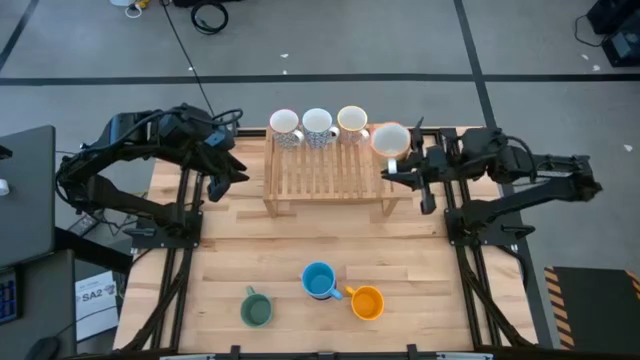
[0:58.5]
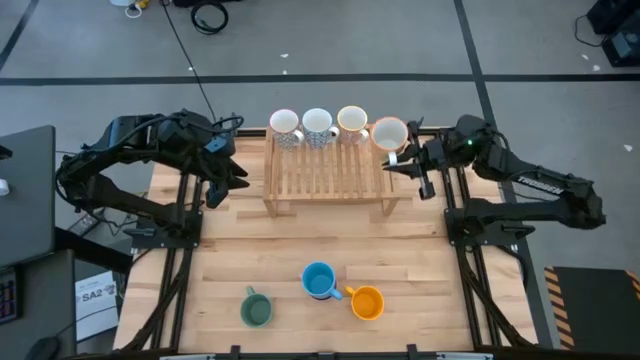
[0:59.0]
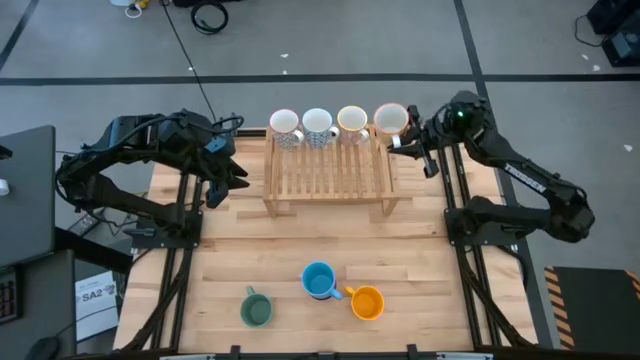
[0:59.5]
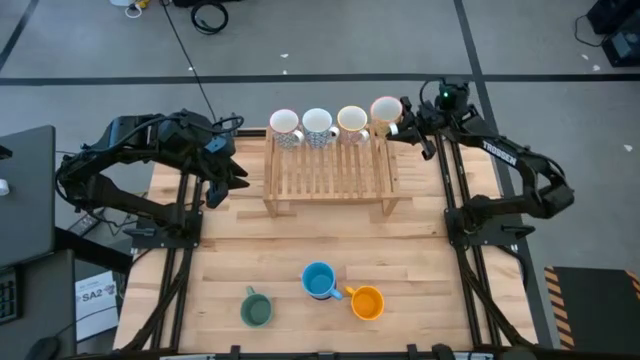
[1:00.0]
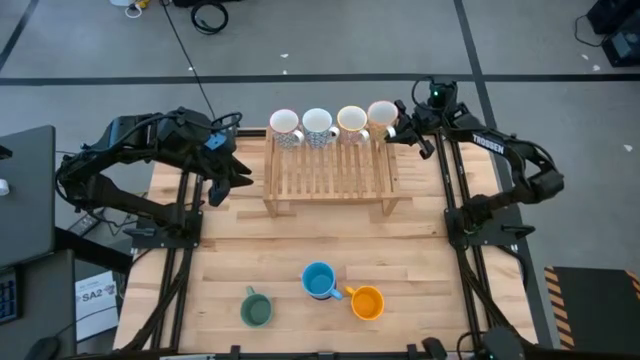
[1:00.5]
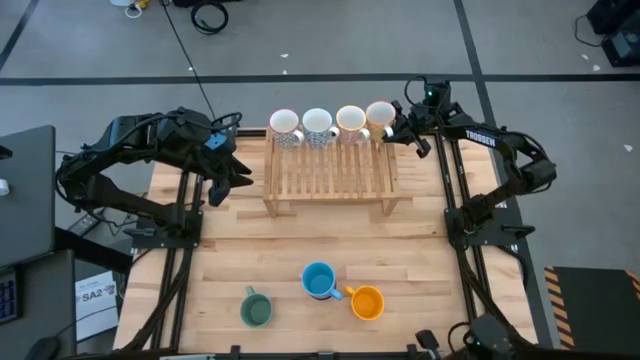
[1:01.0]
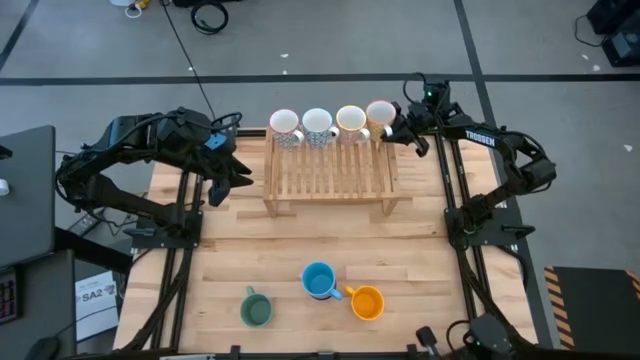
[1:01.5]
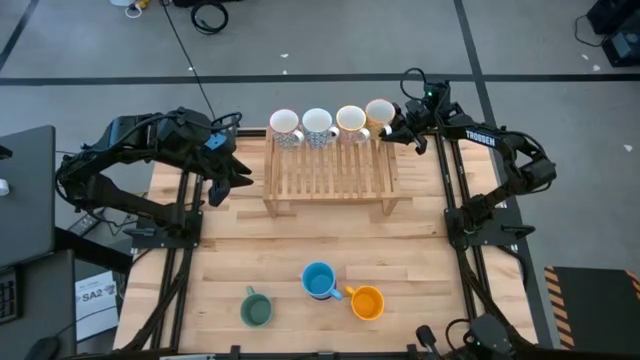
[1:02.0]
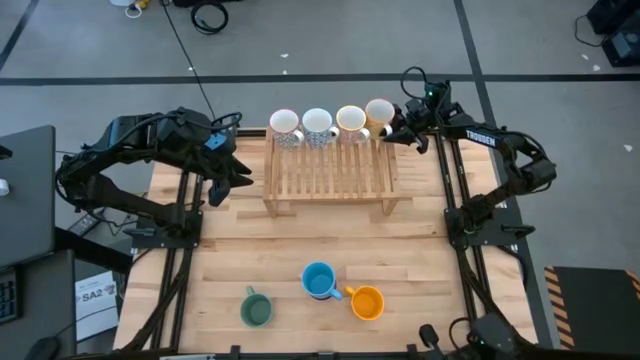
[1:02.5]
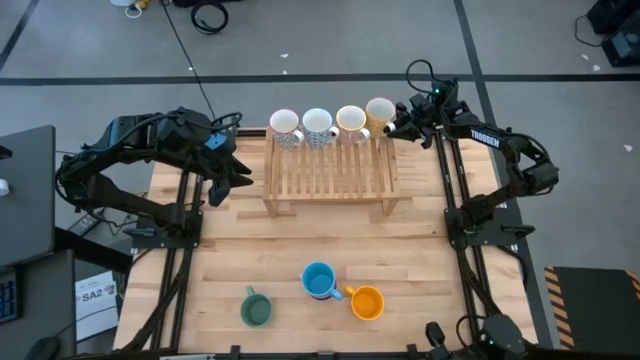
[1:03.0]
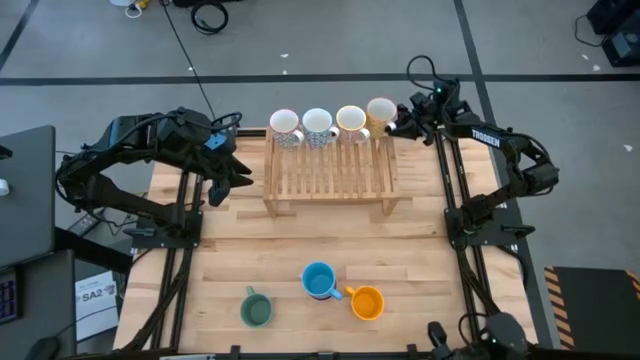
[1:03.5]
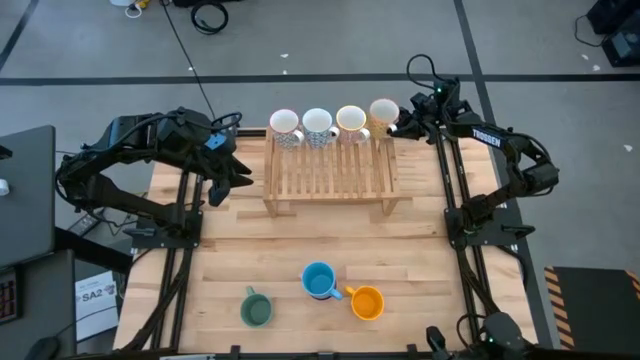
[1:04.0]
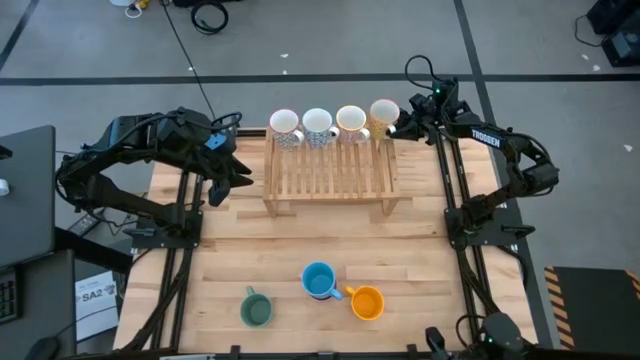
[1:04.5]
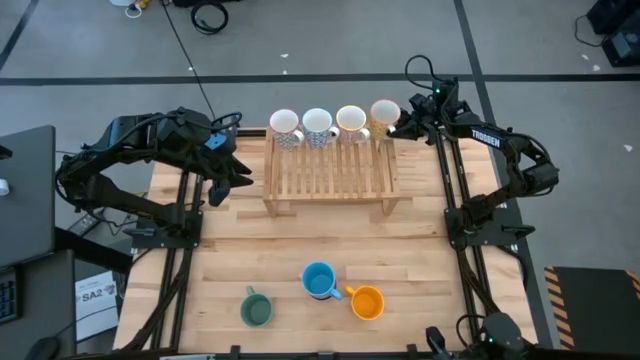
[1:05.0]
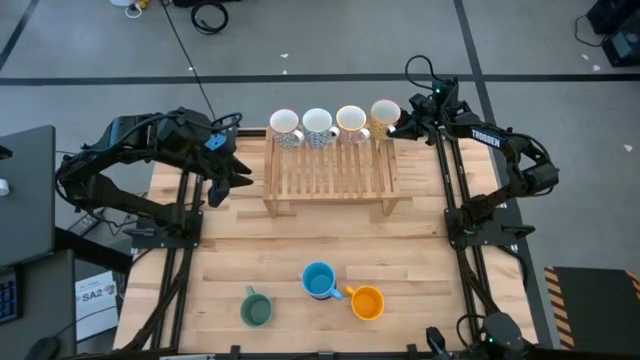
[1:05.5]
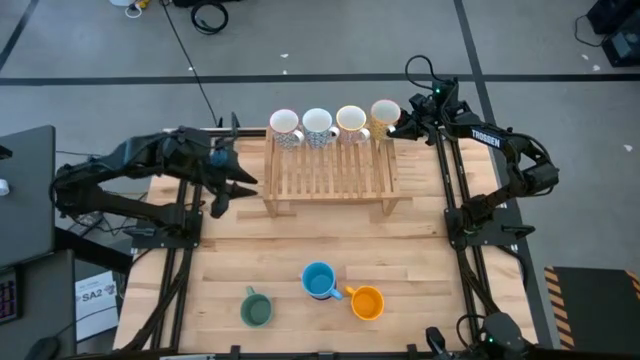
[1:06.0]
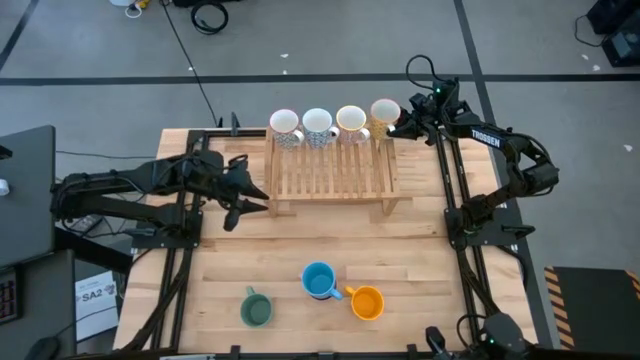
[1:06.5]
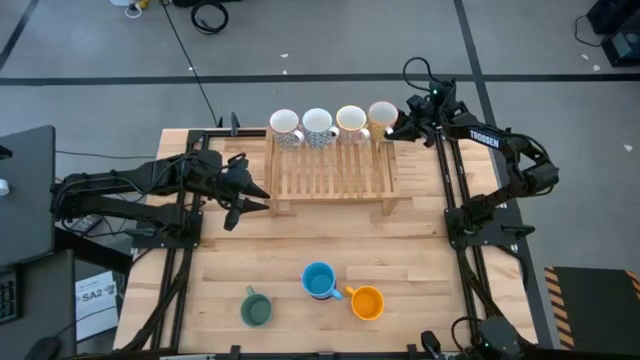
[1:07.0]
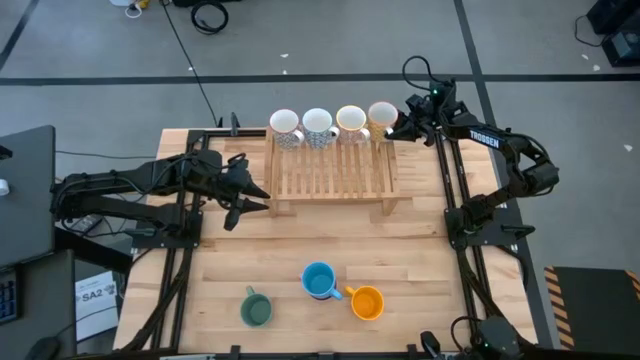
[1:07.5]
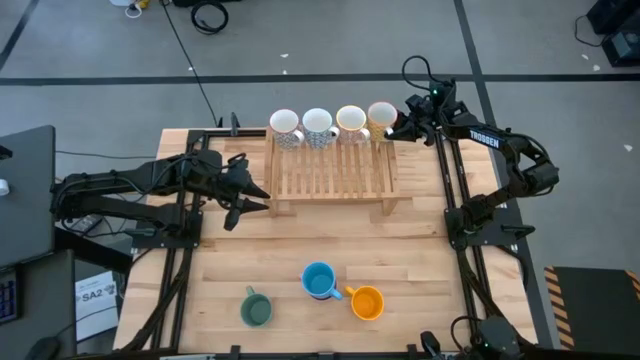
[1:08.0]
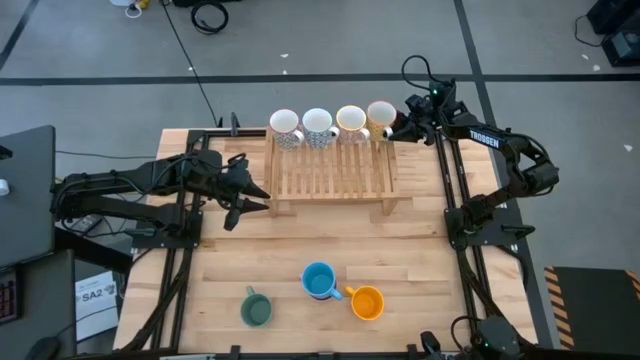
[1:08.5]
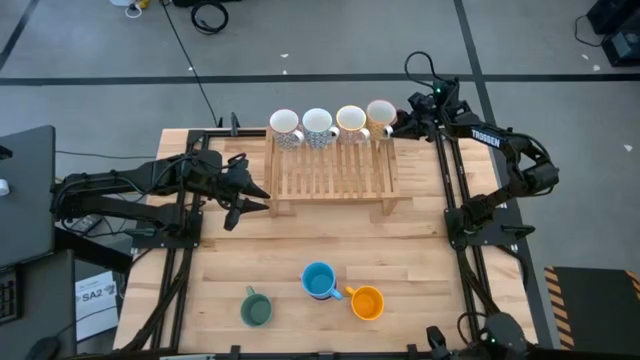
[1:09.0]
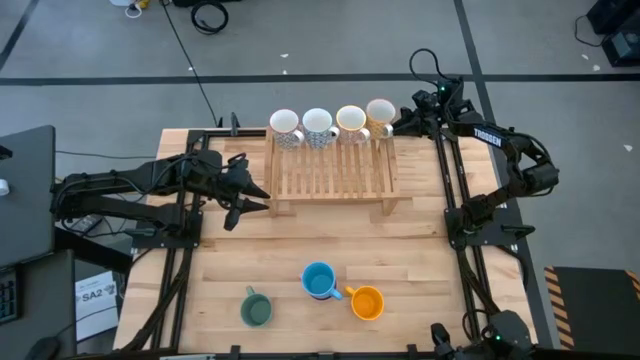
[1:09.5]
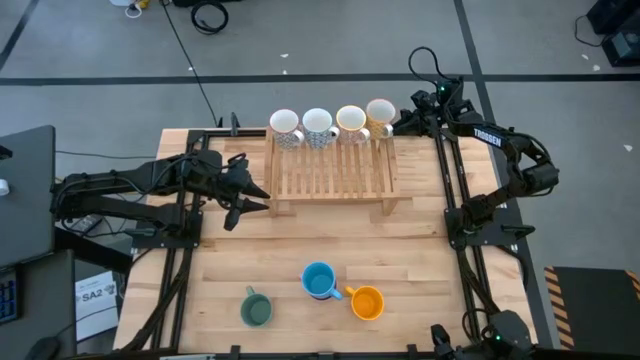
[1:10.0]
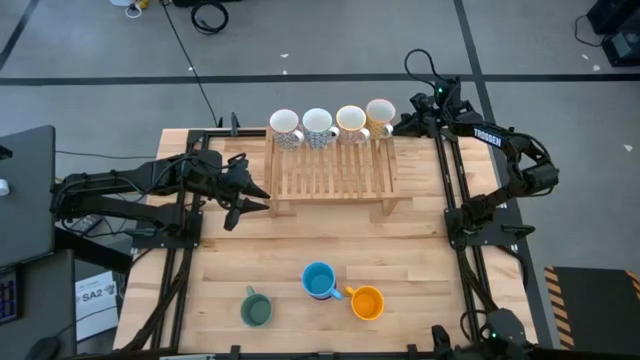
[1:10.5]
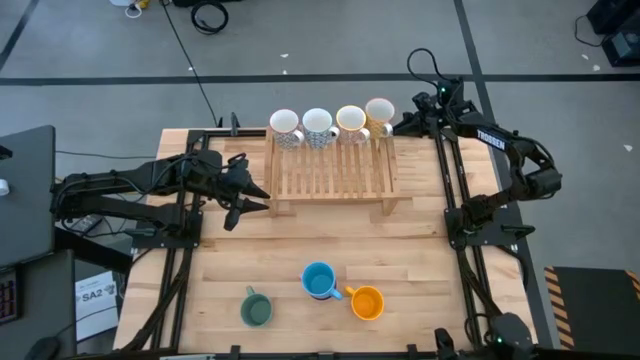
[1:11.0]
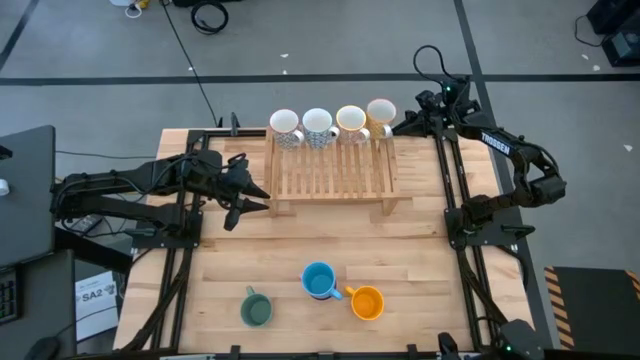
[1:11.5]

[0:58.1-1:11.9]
Task: Place coffee mugs
Put the left yellow mug on the shelf

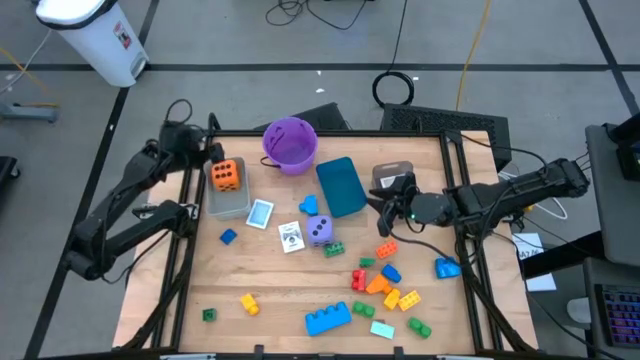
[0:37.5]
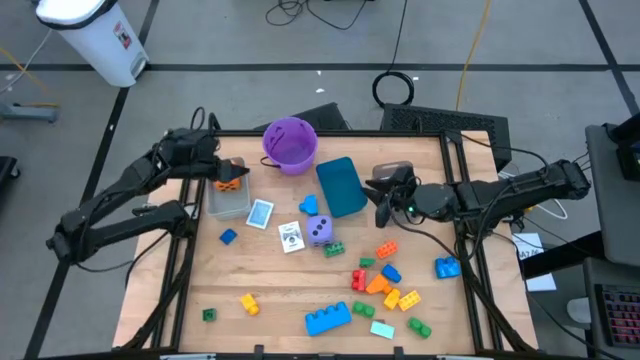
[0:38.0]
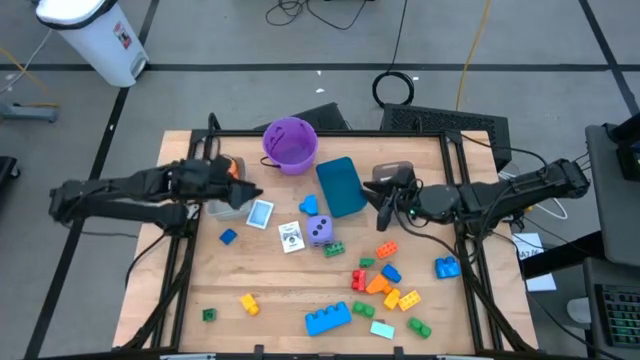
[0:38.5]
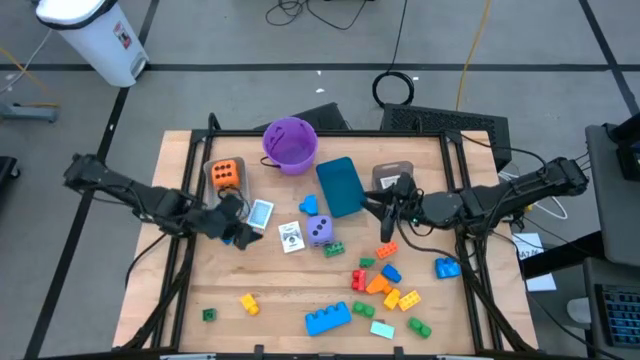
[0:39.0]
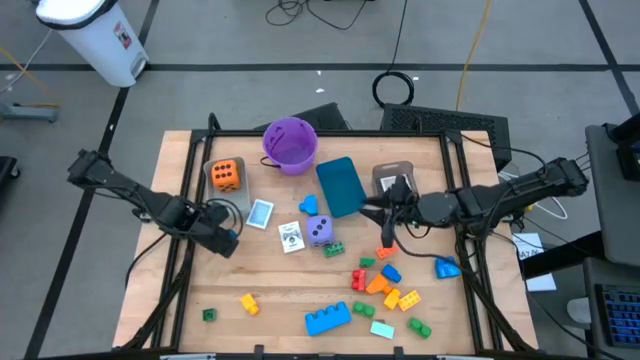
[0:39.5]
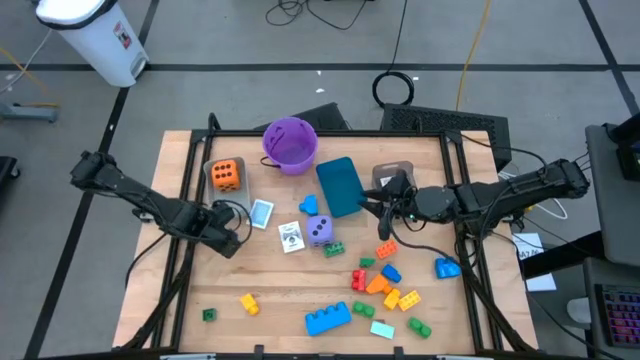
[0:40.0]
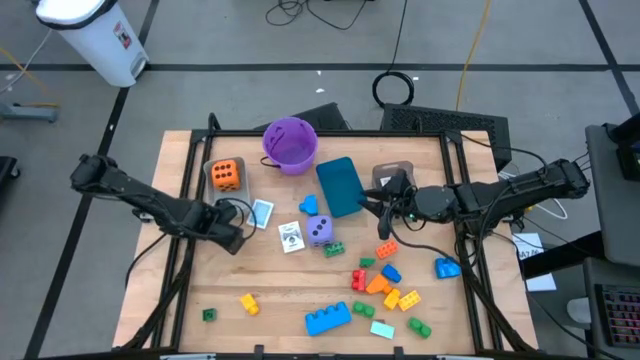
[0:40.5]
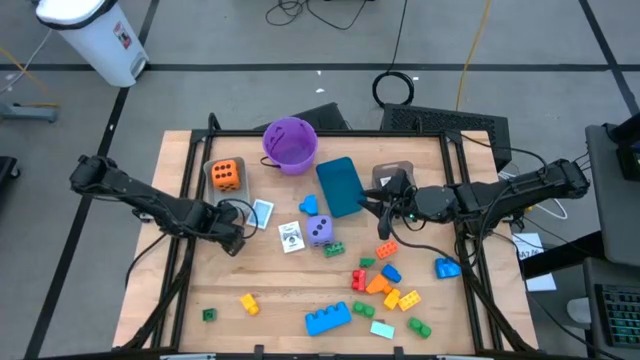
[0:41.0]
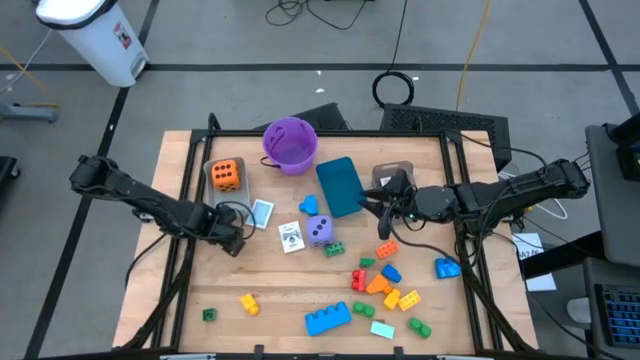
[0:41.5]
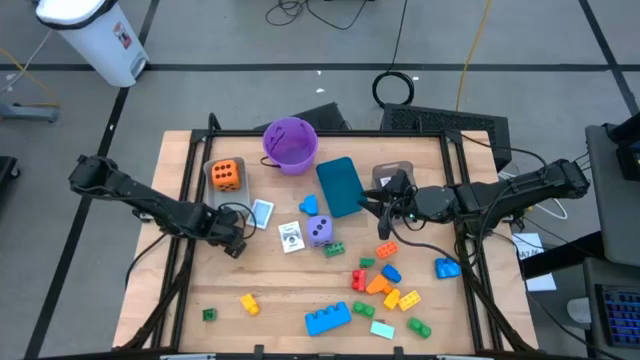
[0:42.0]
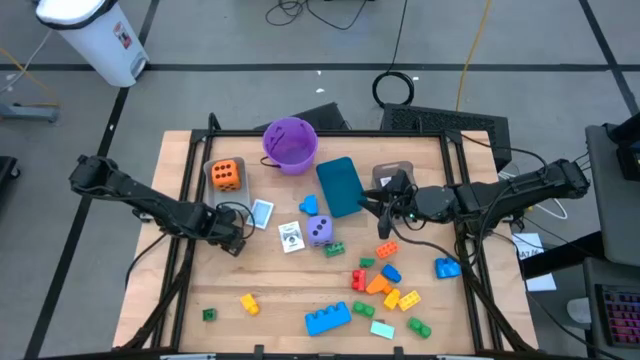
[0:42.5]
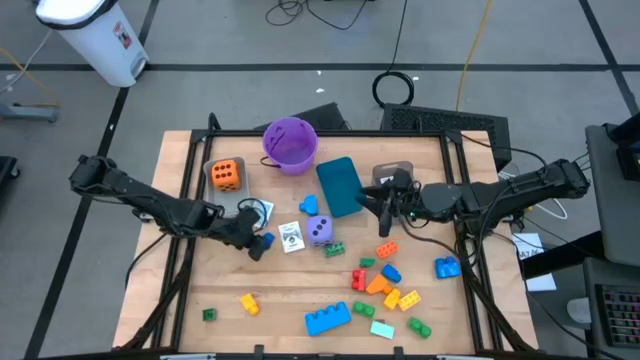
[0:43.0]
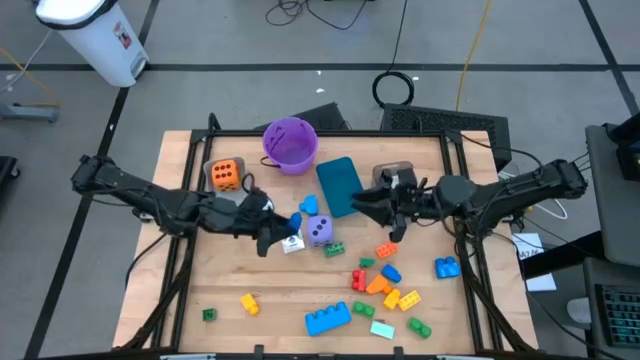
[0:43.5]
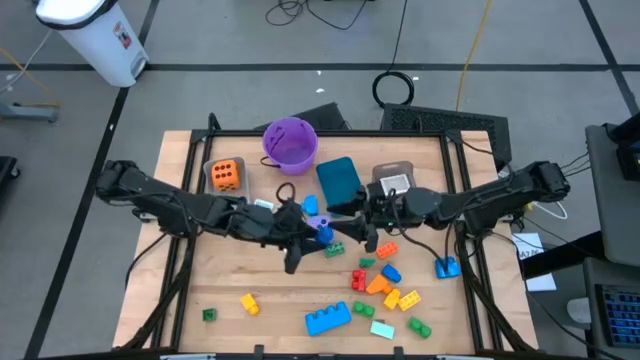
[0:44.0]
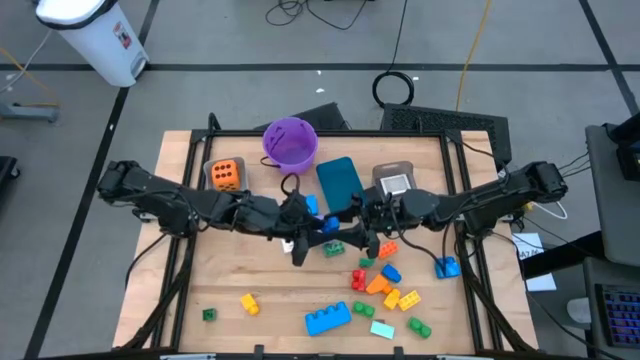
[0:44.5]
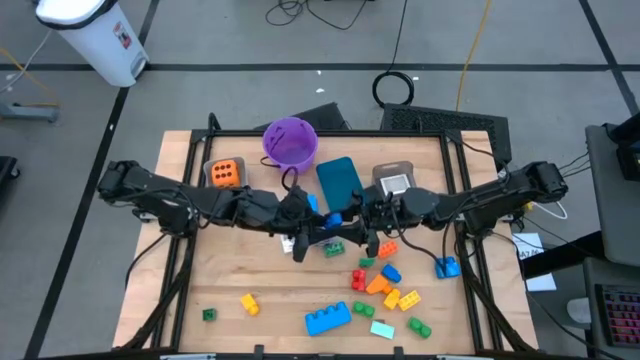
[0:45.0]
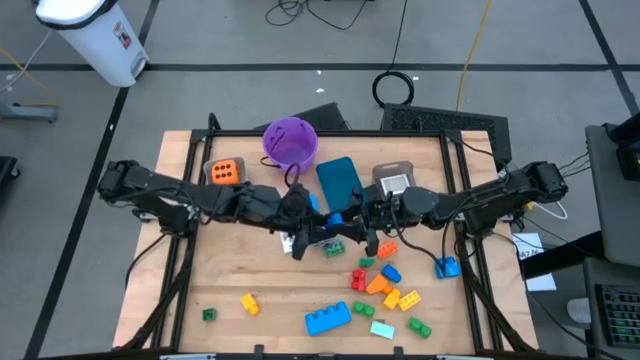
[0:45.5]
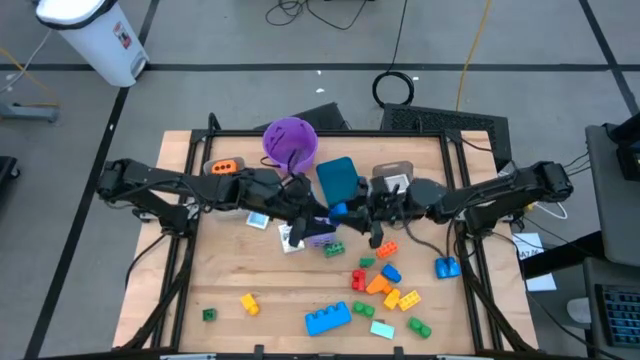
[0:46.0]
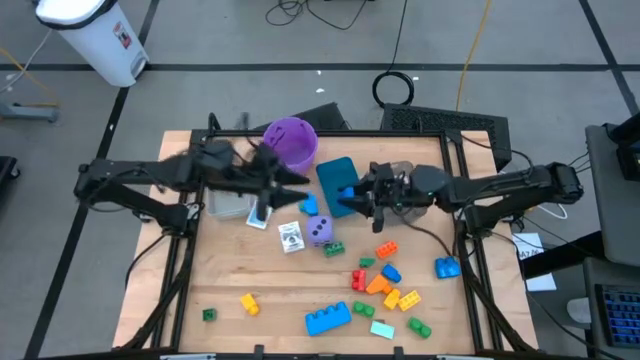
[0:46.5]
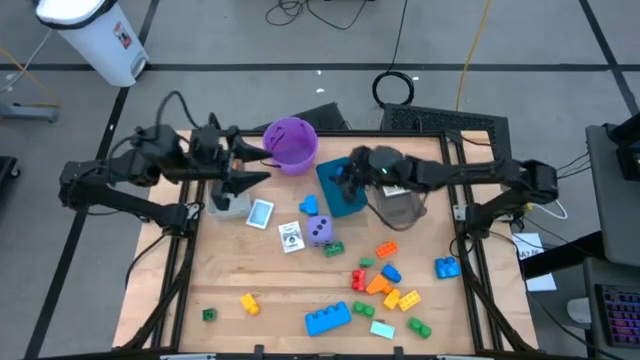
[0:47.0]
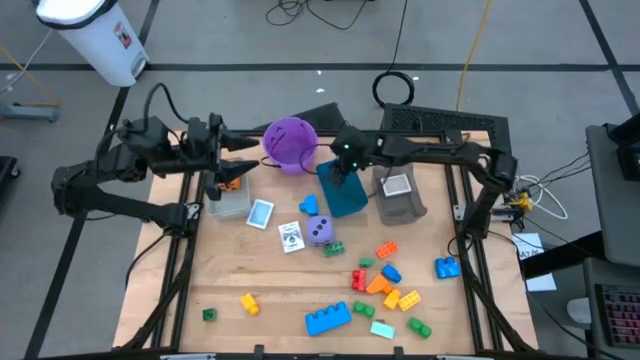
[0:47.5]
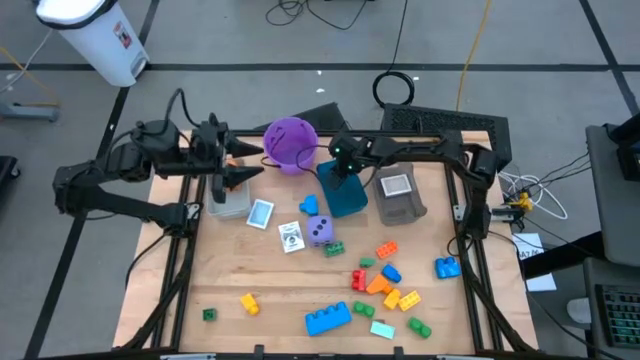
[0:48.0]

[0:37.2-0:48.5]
Task: Pick & Place Toys
Put the dark blue game piece into the blue bin
